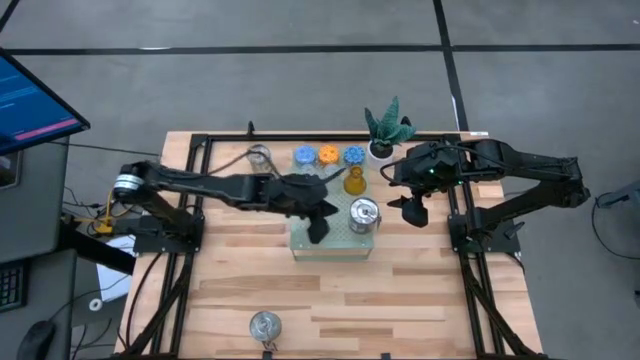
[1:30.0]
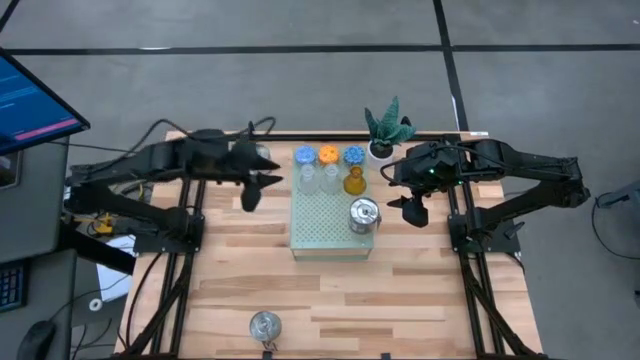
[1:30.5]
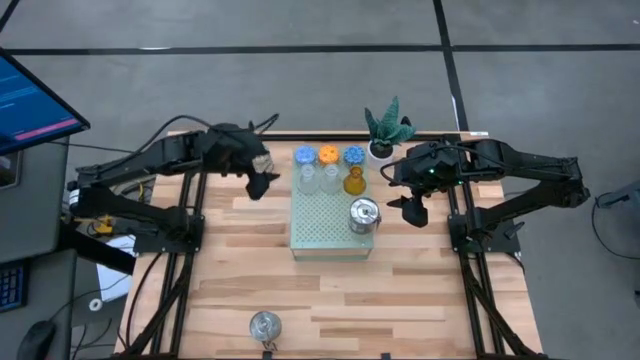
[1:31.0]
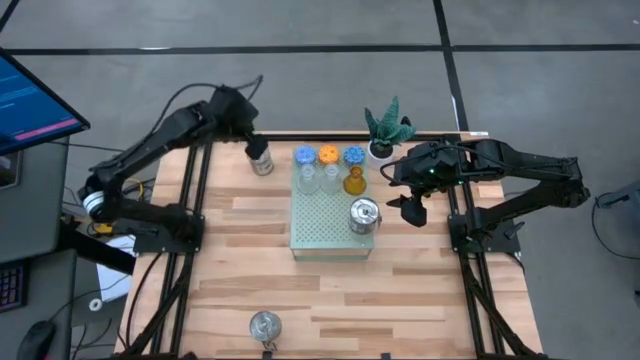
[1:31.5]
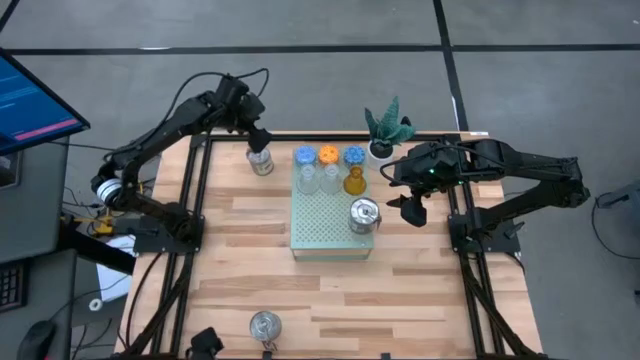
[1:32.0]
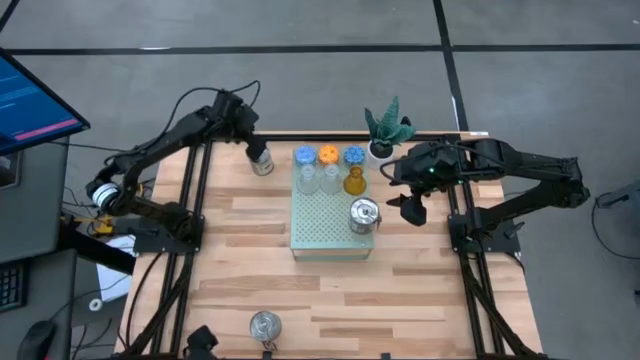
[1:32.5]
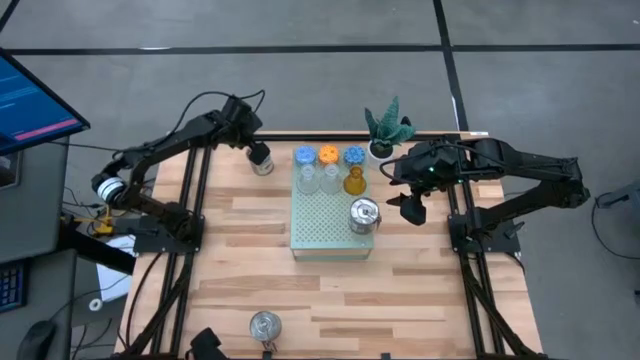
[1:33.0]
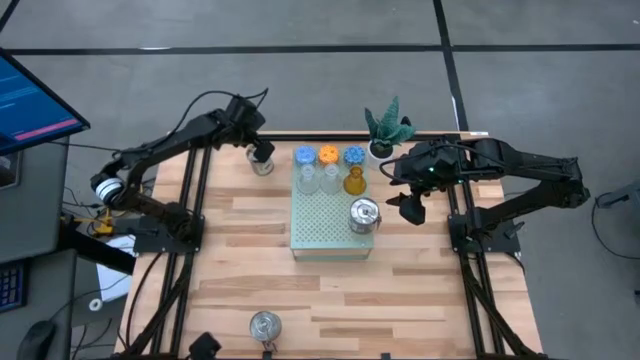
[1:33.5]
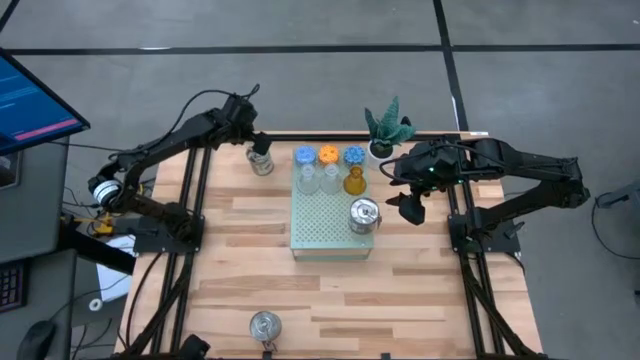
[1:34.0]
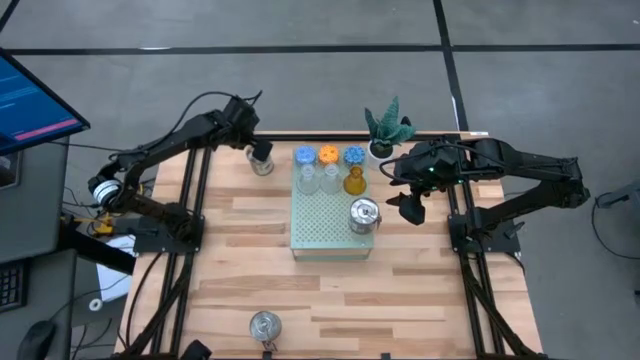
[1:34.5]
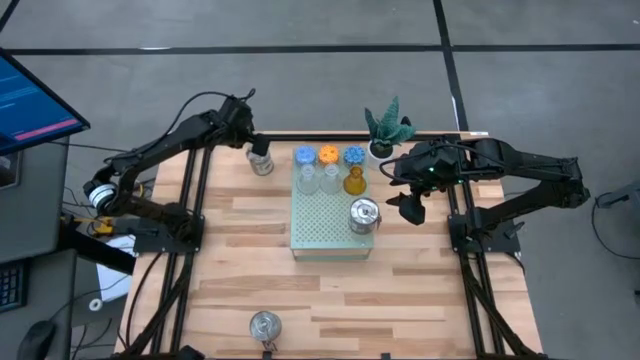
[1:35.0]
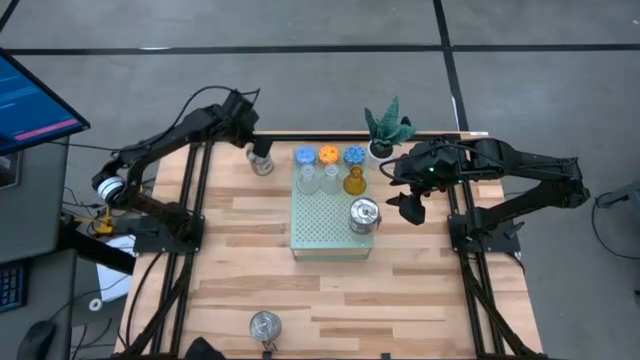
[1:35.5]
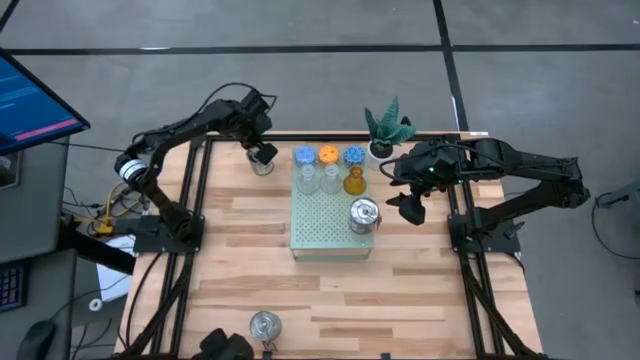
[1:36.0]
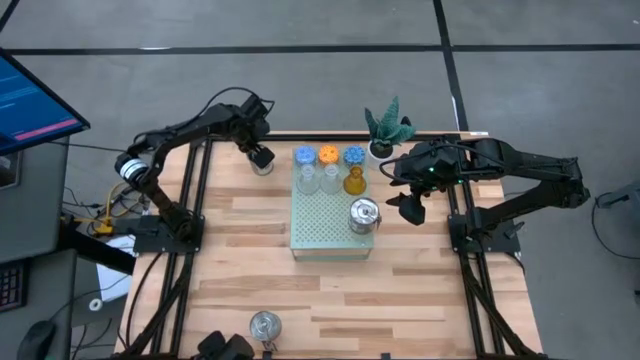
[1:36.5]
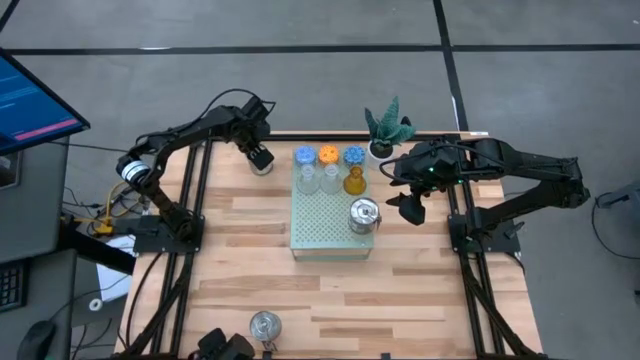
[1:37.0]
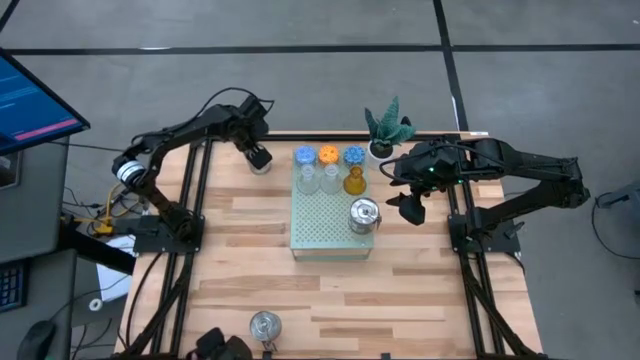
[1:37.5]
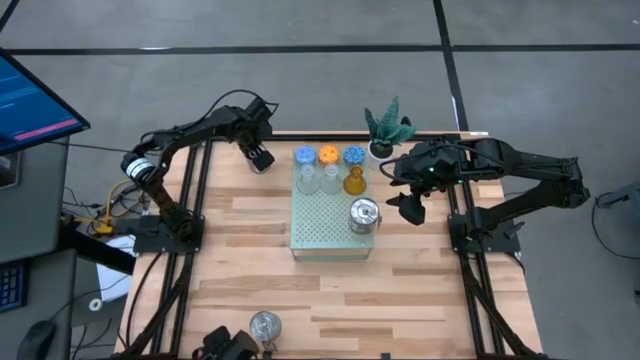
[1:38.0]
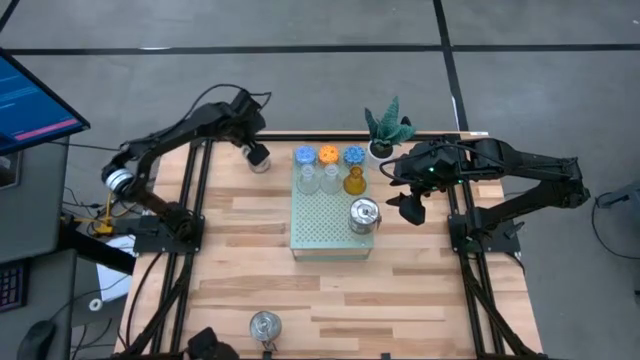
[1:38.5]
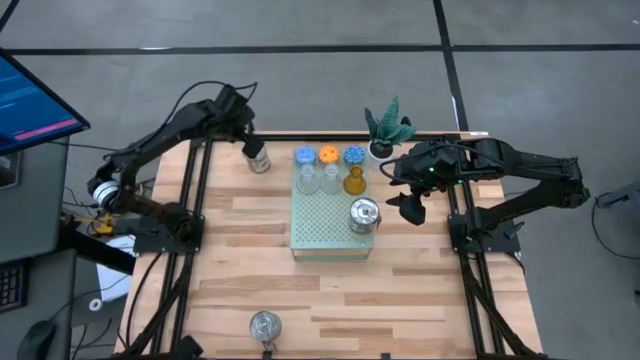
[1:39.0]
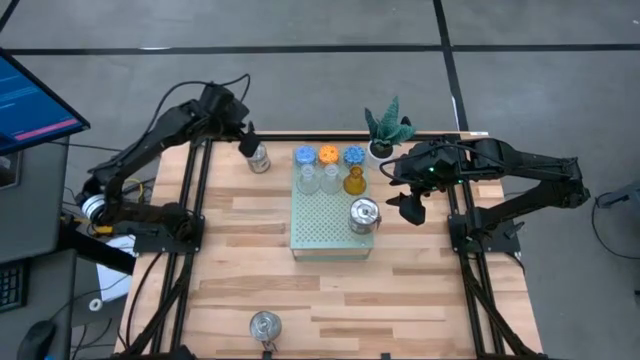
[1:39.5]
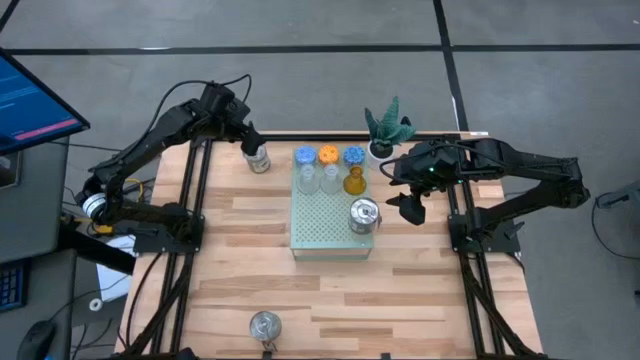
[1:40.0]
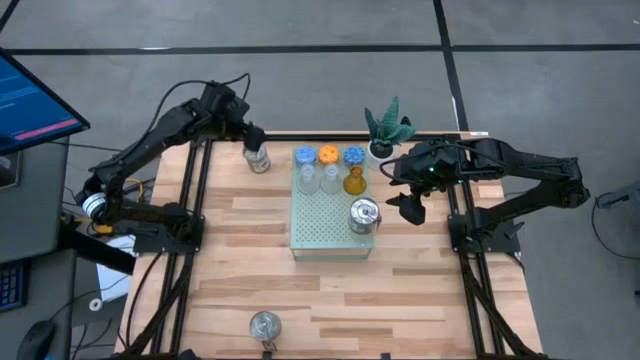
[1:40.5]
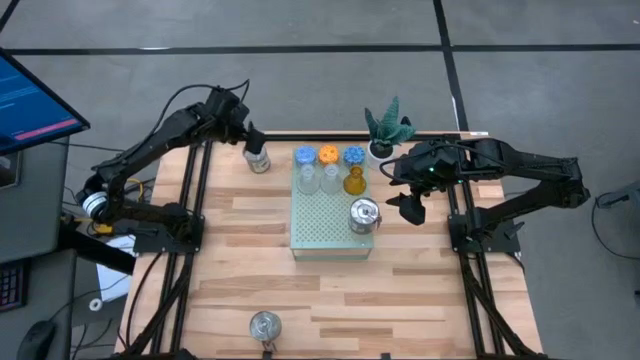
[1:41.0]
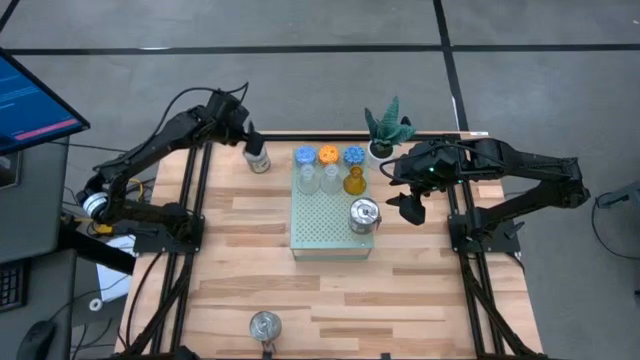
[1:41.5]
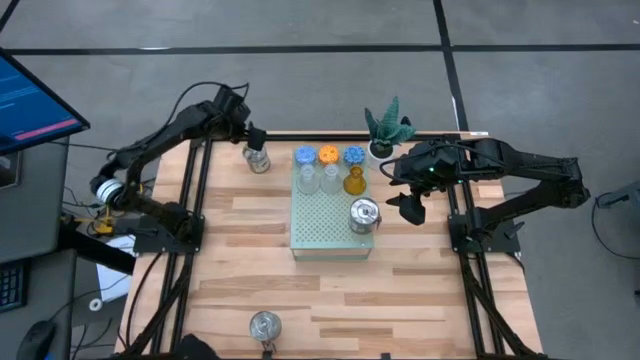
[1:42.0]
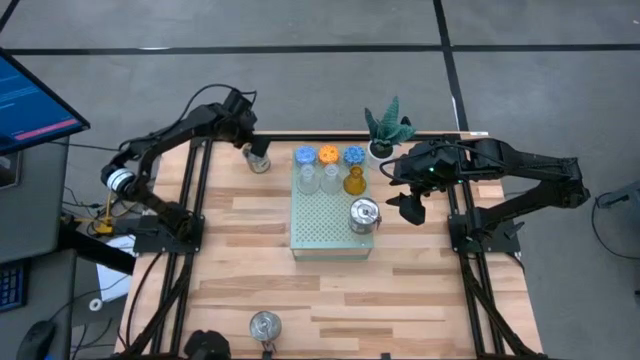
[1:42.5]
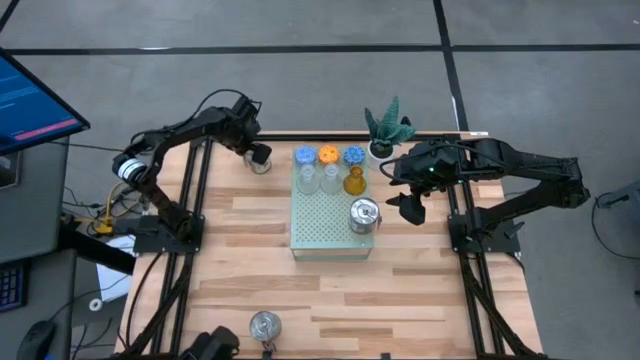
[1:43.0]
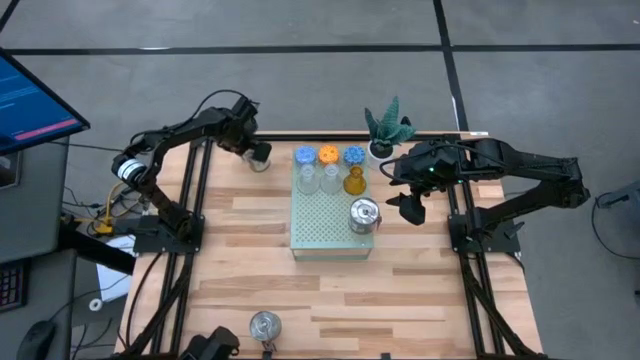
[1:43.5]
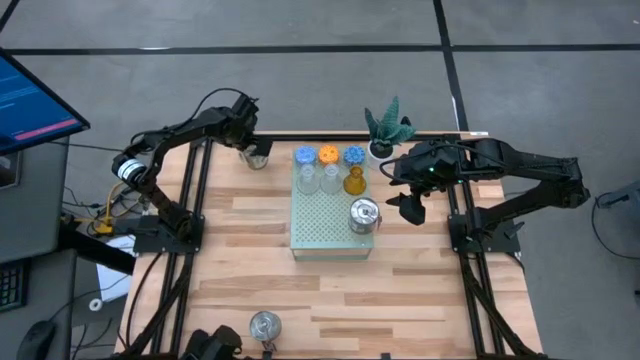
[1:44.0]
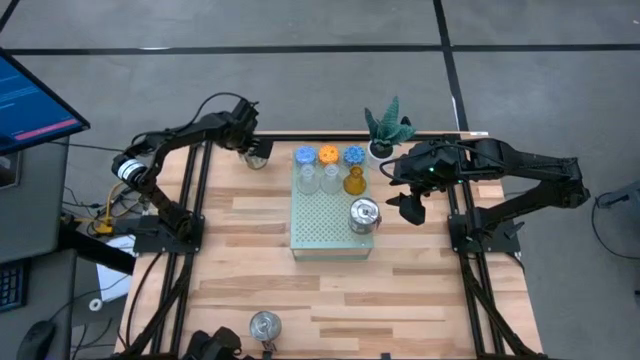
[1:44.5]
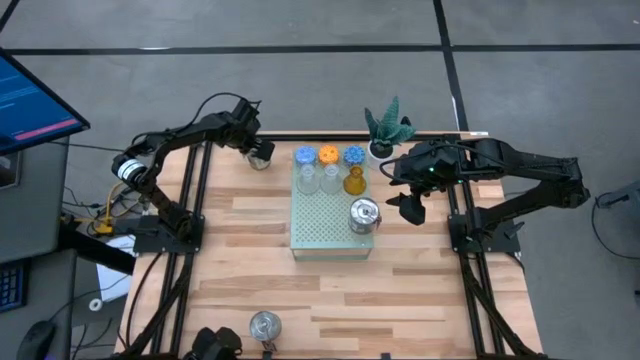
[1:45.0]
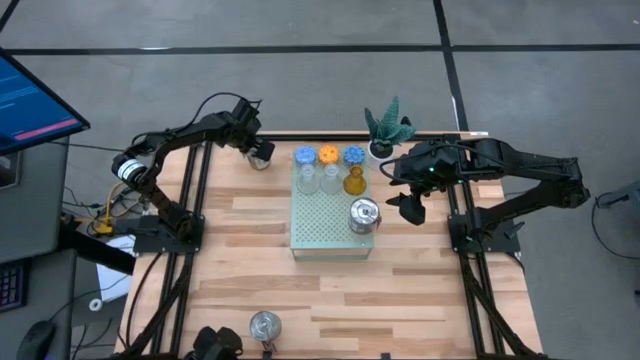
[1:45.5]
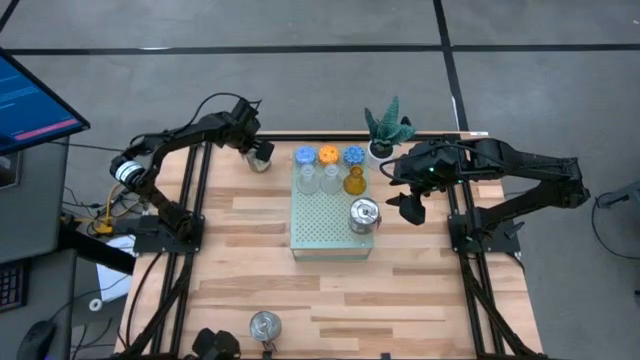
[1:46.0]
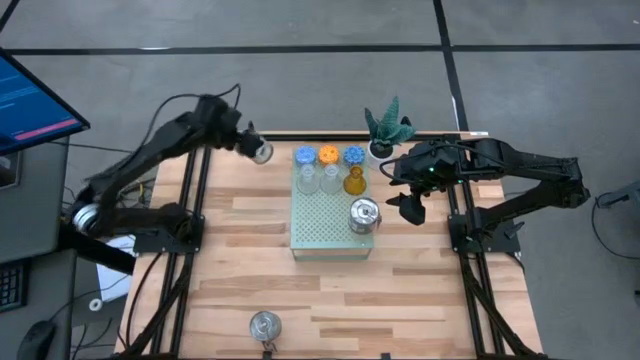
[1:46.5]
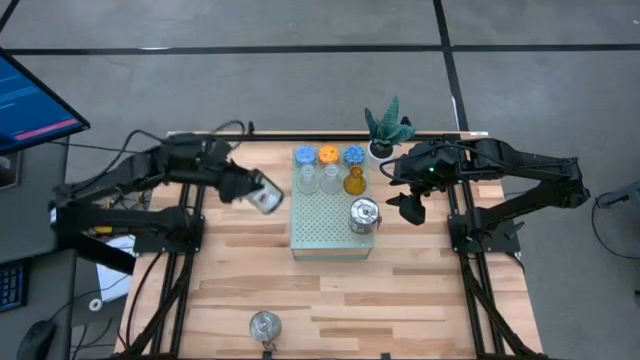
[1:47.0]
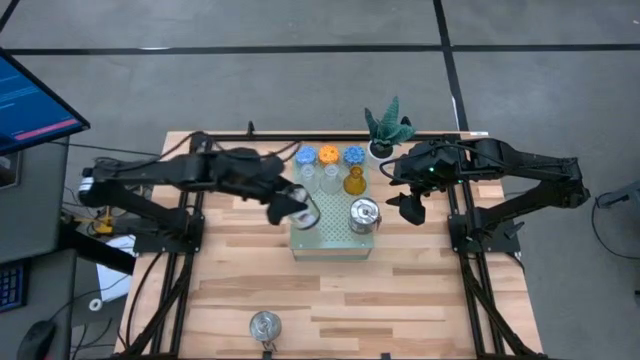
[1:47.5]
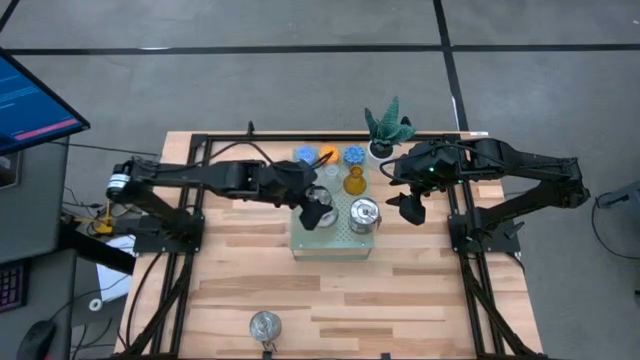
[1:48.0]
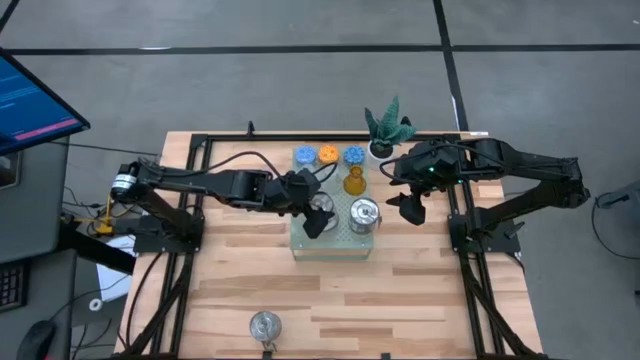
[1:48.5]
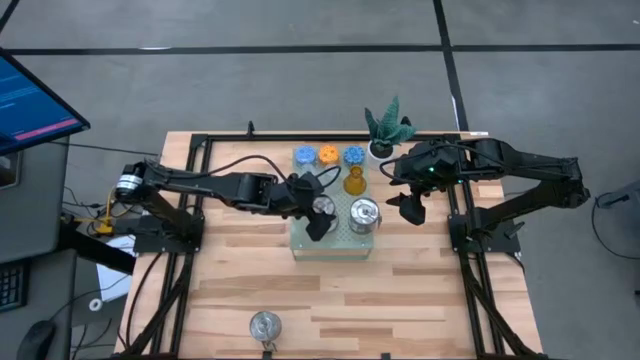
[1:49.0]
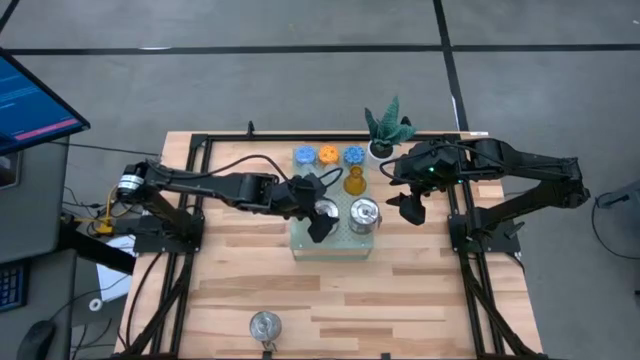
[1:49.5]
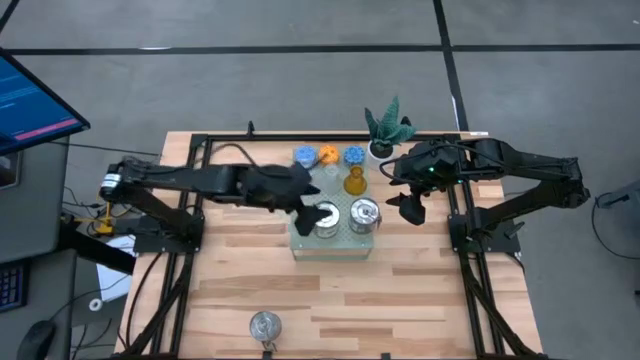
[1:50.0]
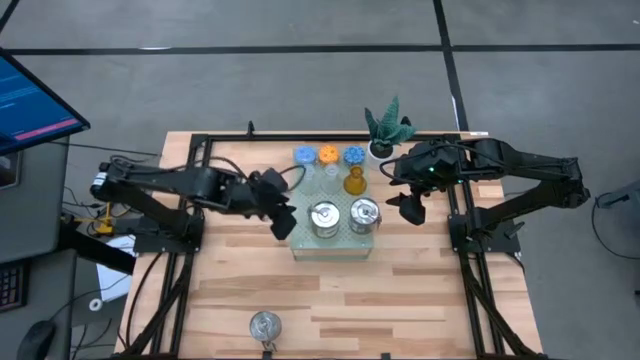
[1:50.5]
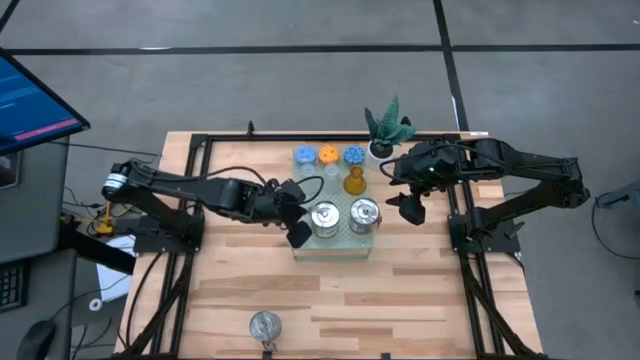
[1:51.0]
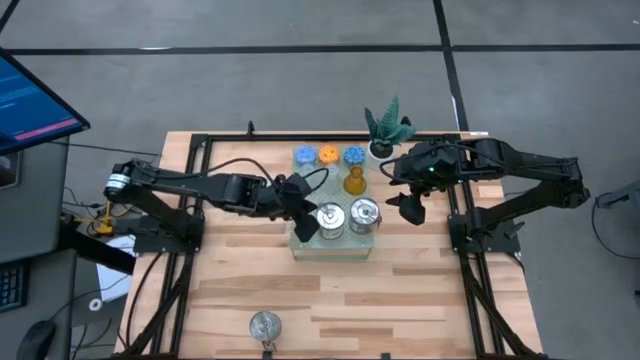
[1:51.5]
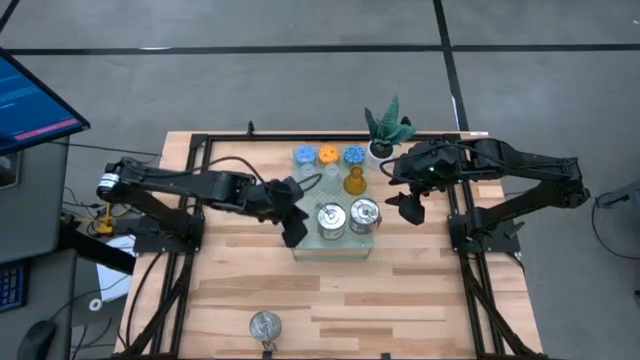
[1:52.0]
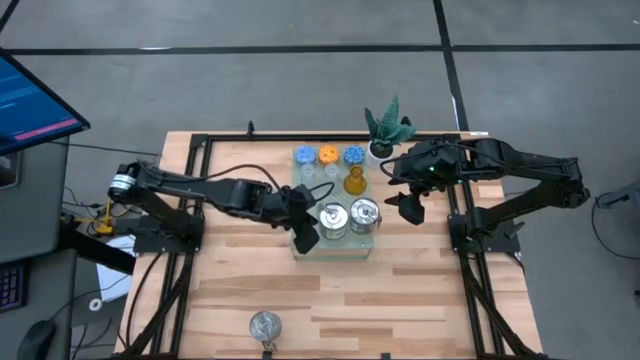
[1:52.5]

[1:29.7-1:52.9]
Task: Stock candles and holders on shelf
Put the top silver scented candle can on the shelf aligned with the other silver scented candle
